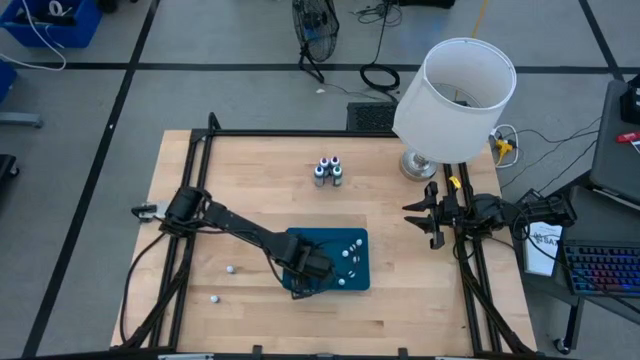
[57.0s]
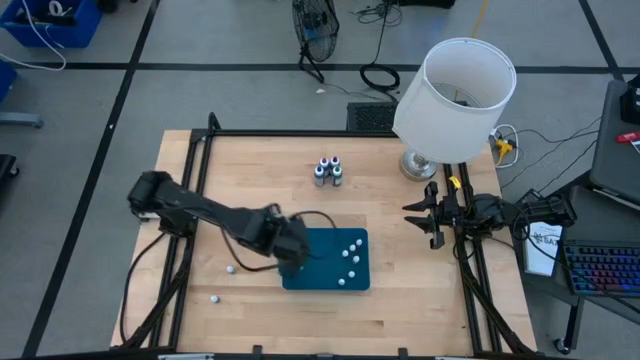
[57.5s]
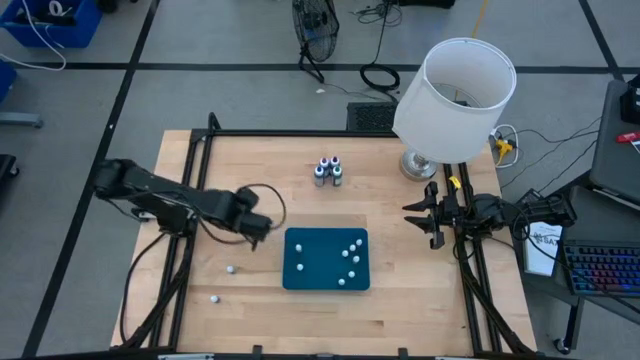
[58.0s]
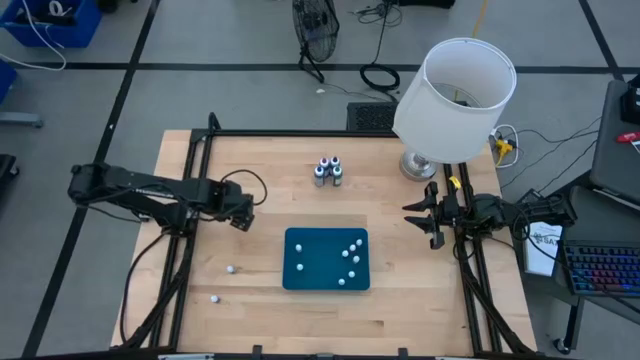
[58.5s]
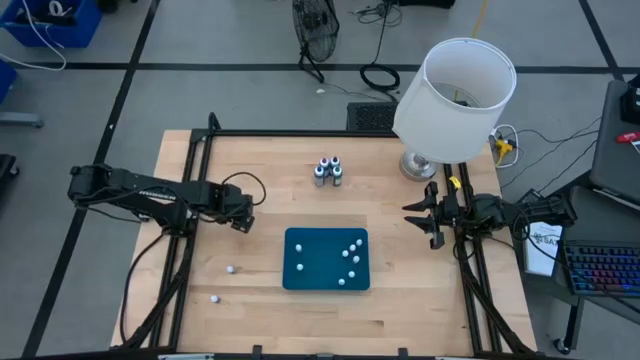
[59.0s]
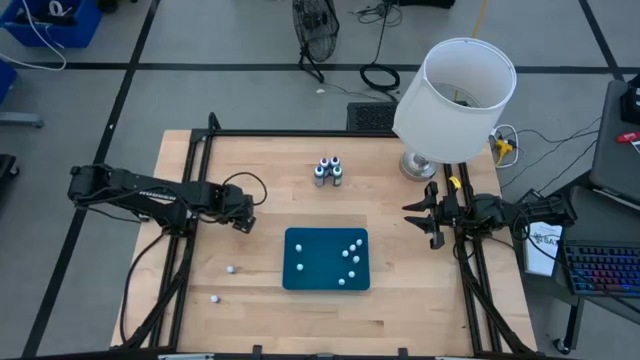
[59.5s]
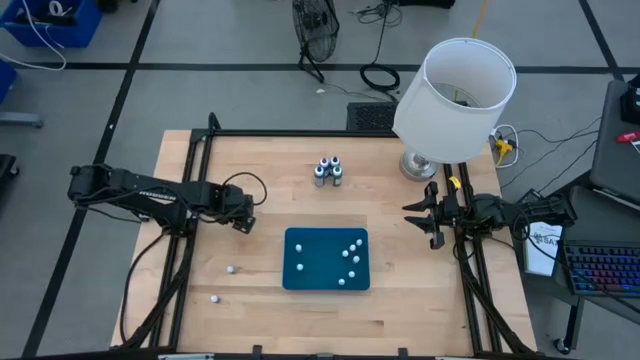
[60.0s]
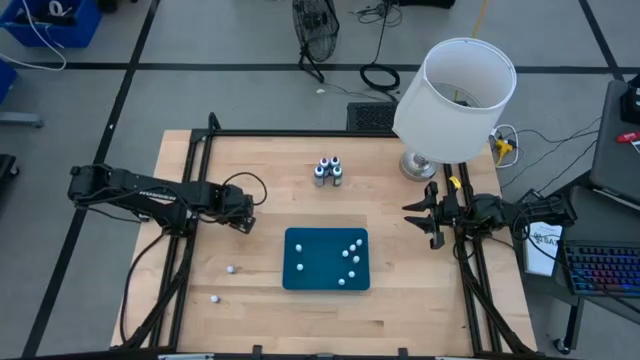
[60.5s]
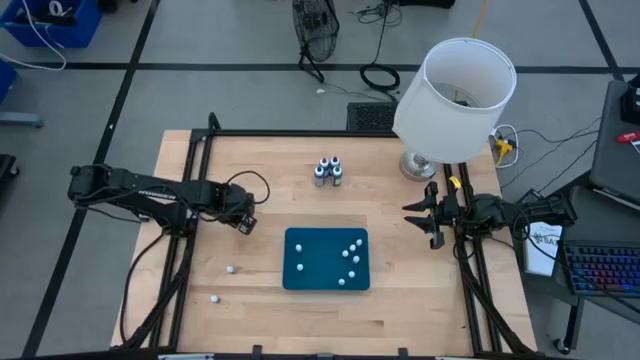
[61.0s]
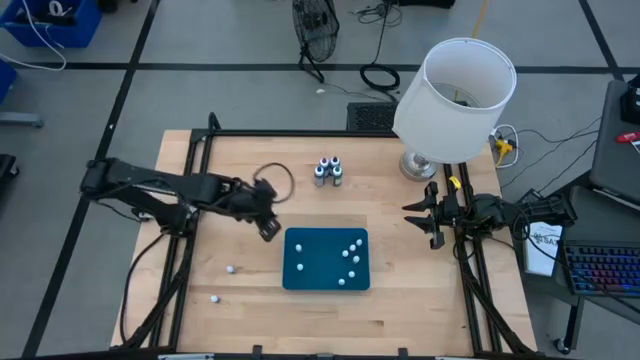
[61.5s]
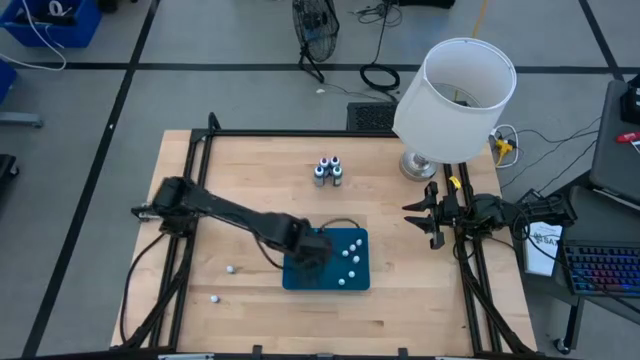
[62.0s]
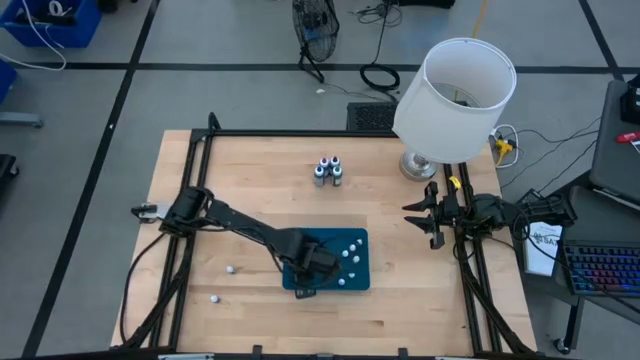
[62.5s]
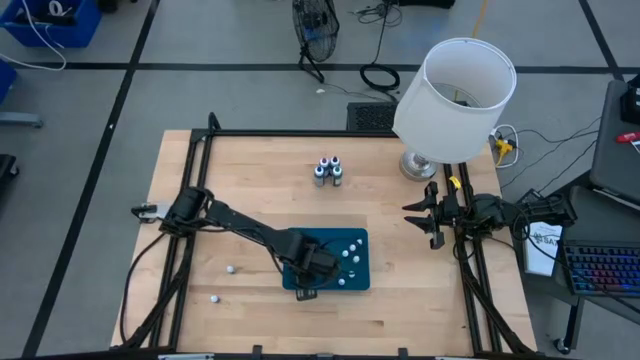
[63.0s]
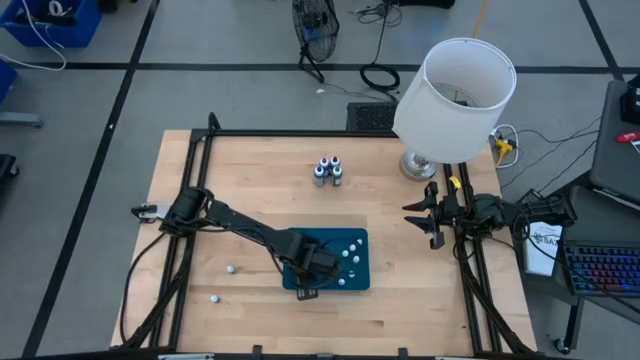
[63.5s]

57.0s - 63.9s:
Task: Pick & Place food coloring
Put the yellow food coloring bottle into the bin

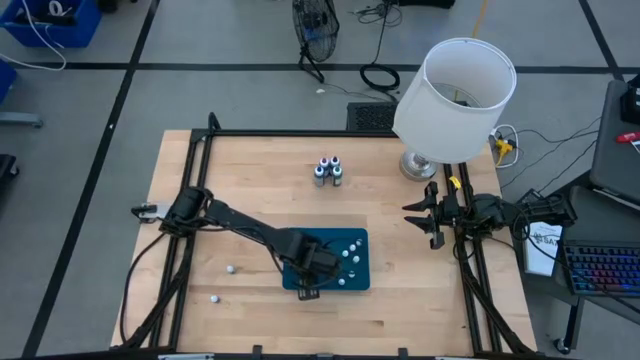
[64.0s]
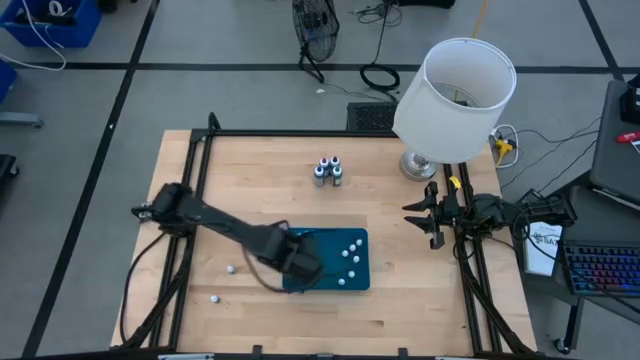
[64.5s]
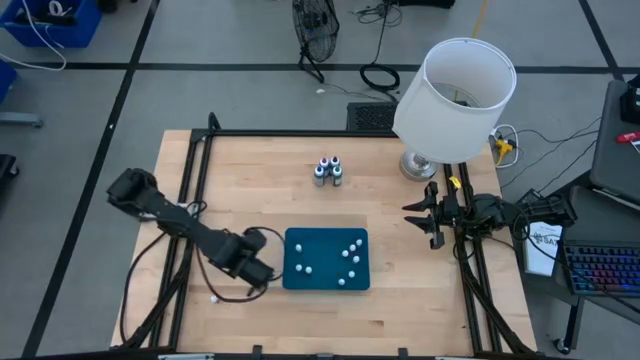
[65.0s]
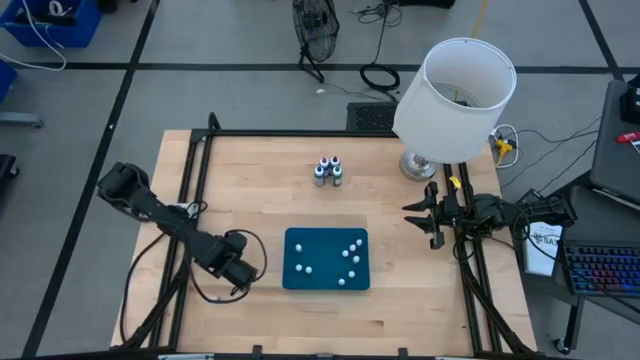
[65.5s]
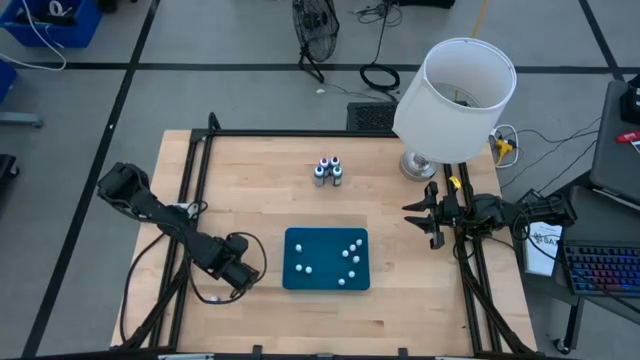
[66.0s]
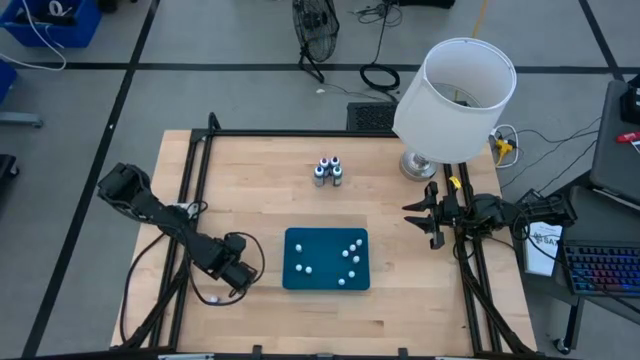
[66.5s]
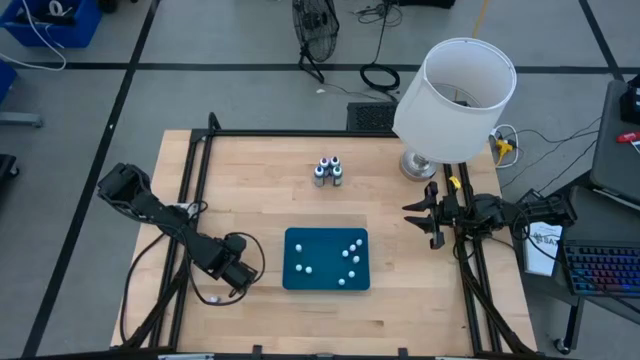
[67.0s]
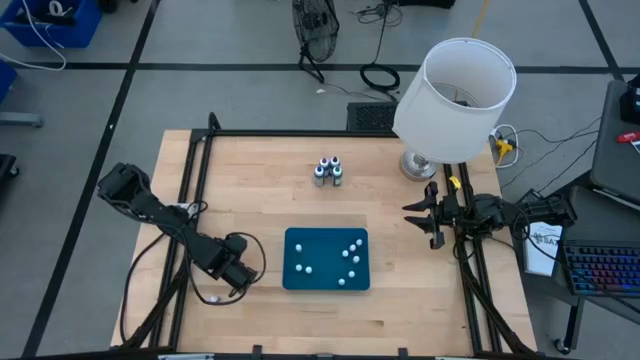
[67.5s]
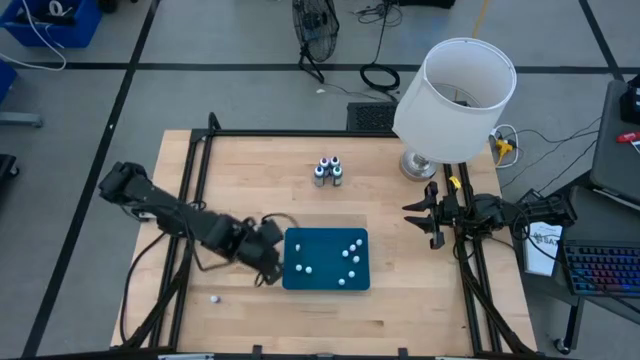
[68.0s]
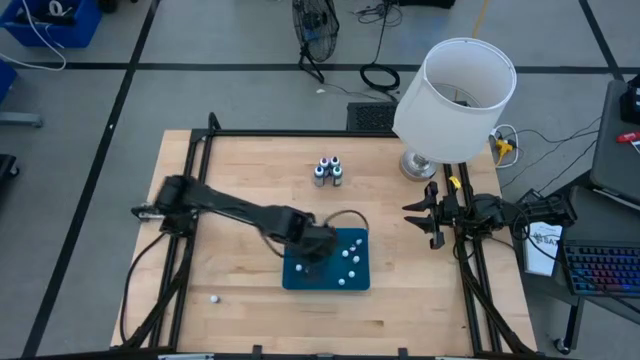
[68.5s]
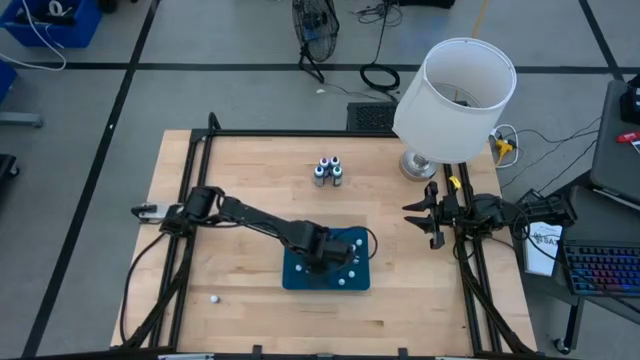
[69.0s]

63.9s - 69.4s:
Put the black food coloring bottle into the bin

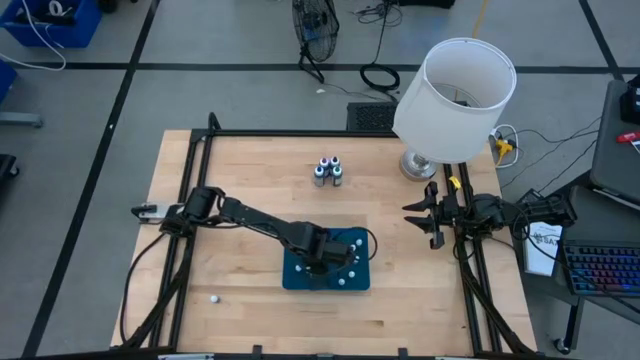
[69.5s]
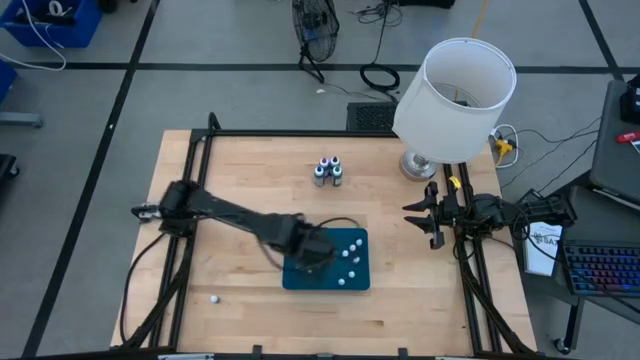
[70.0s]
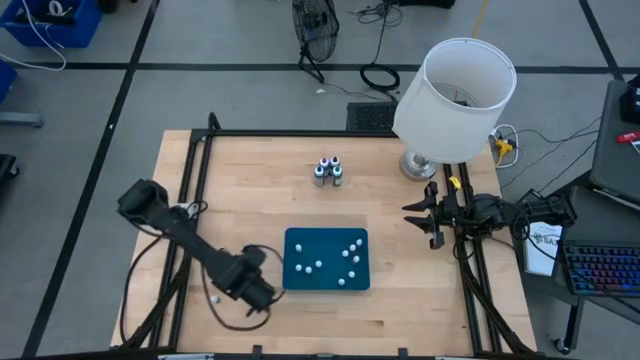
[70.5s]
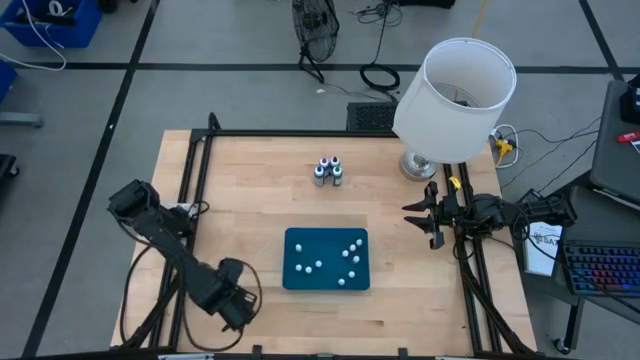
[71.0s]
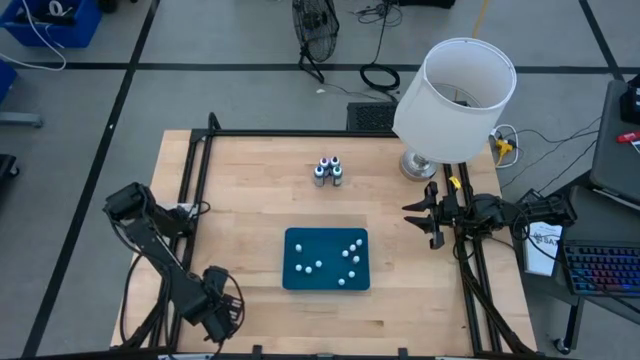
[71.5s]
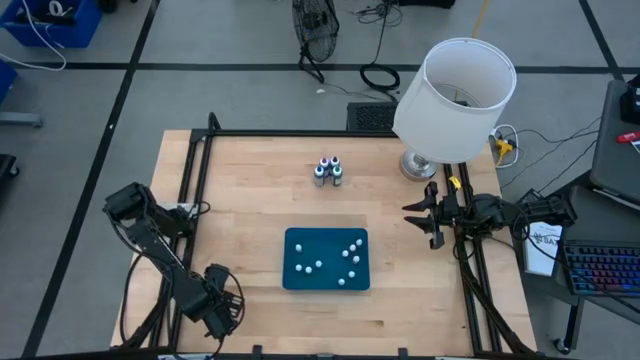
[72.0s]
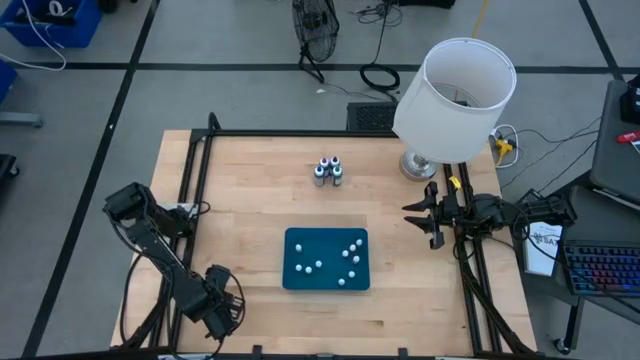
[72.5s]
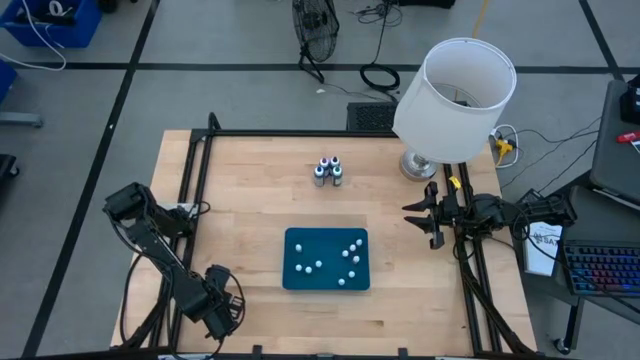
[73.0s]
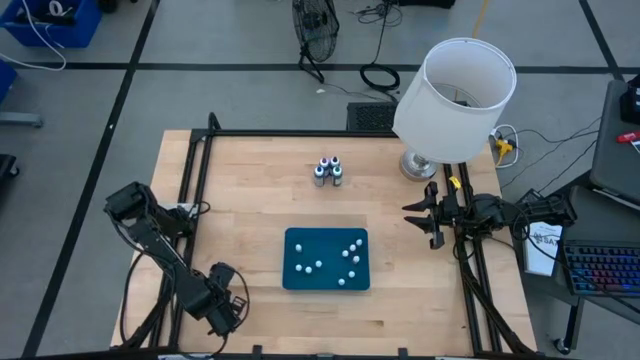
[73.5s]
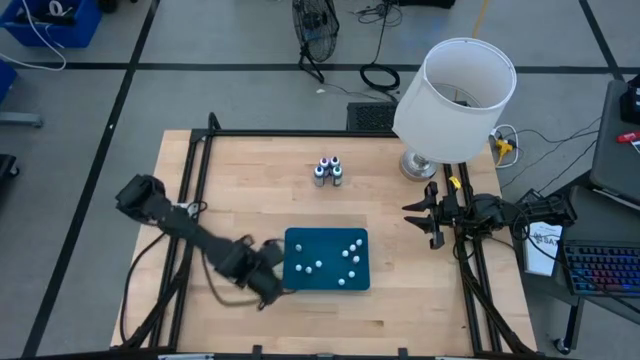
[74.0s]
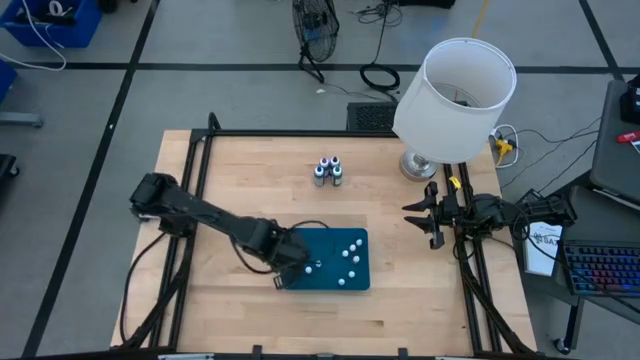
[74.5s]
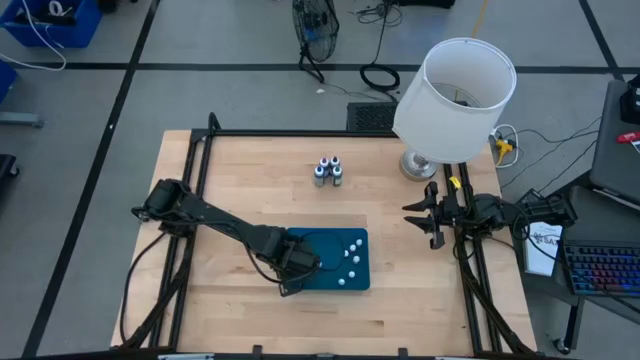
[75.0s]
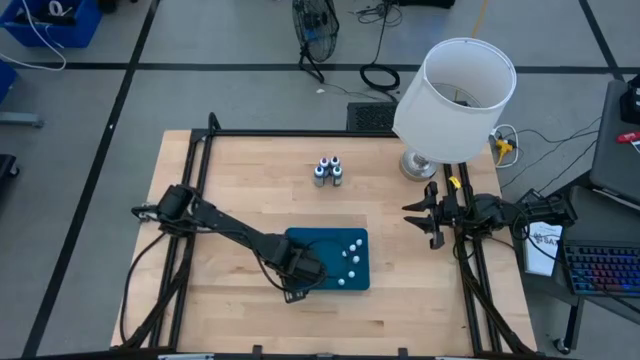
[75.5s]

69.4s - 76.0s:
Put the purple food coloring bottle into the bin

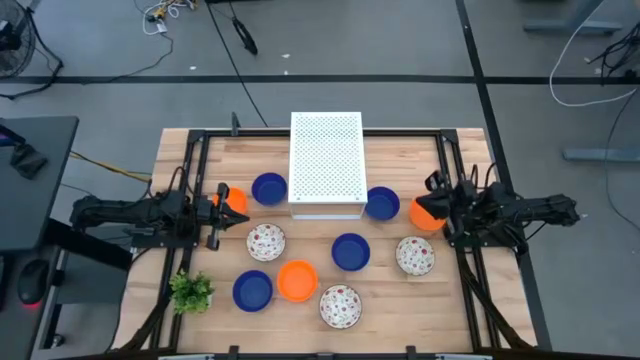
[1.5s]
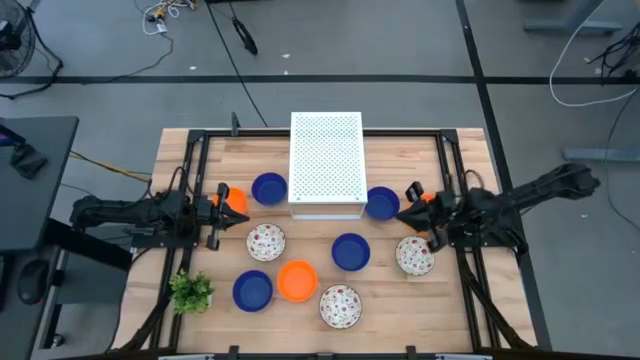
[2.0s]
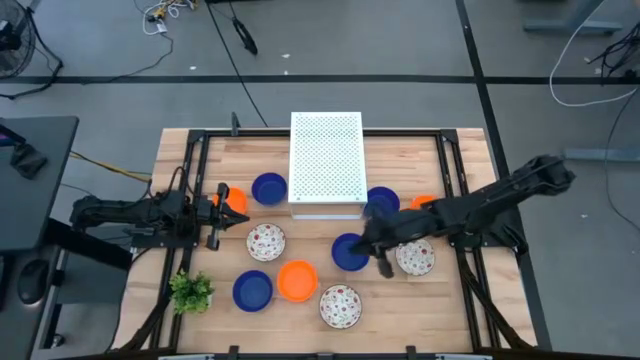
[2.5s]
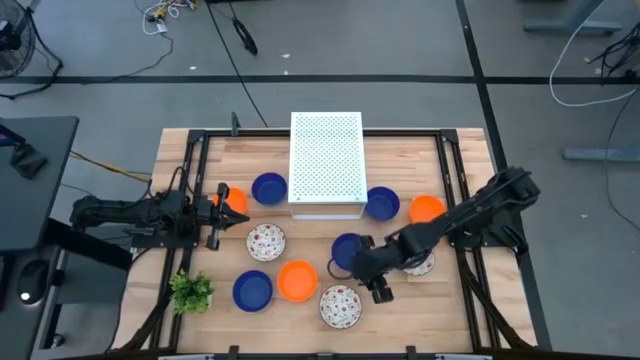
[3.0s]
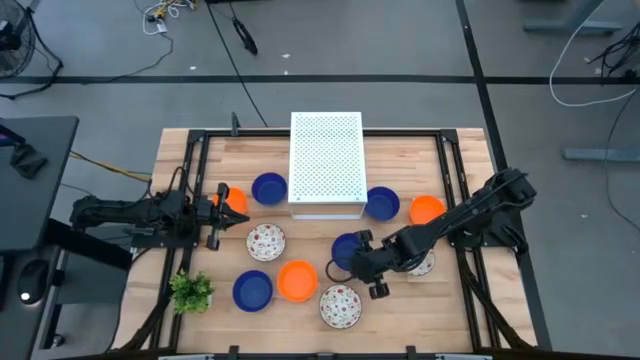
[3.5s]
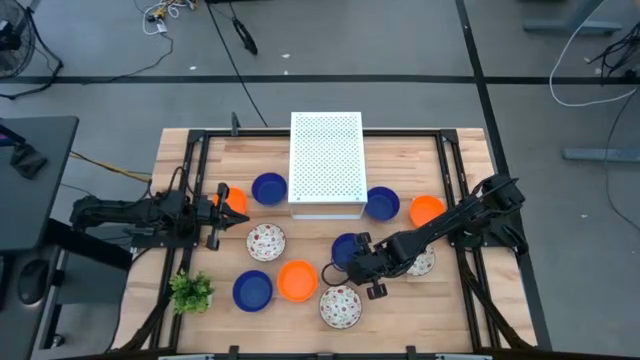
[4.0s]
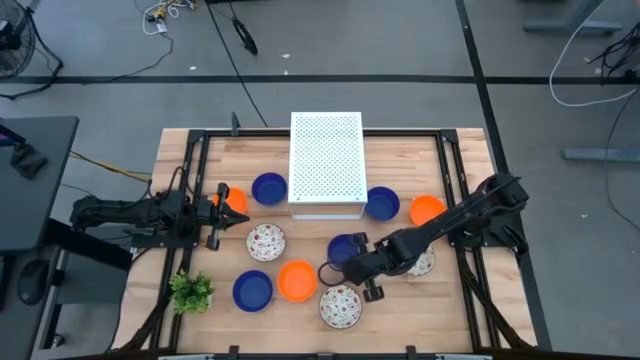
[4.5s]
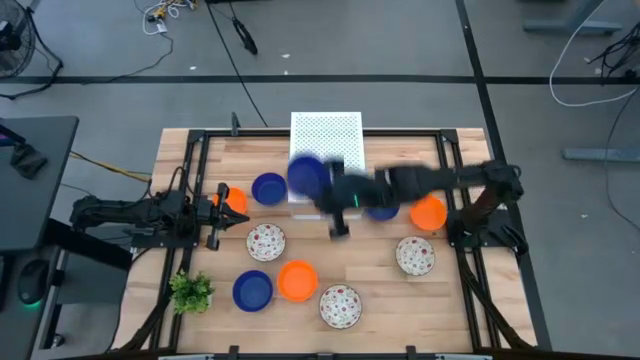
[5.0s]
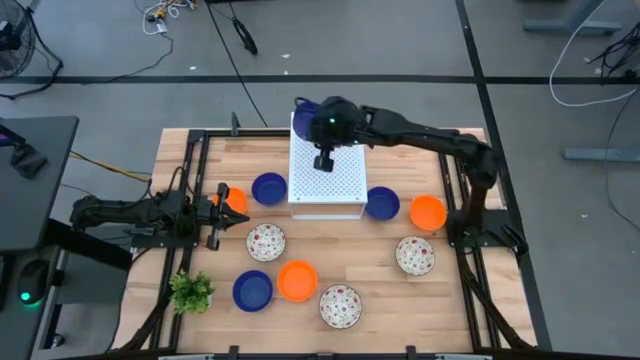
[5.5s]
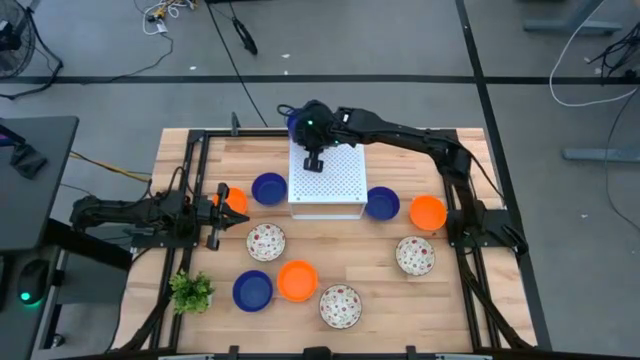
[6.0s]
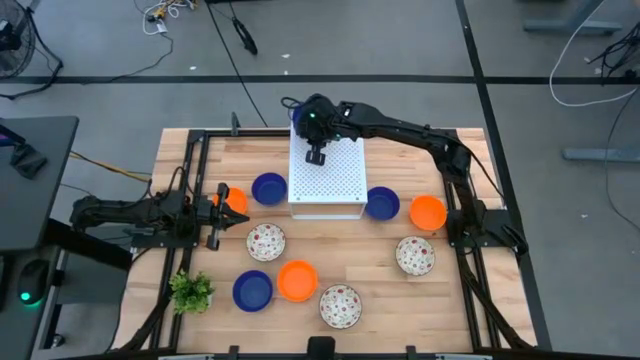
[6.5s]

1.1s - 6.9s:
Task: Pick & Place Mini bowls
Put the blue bowl on the shelf
